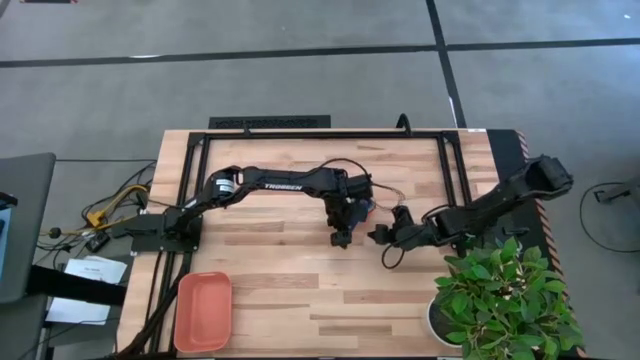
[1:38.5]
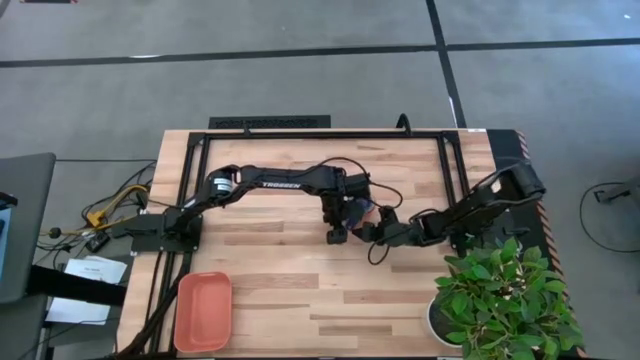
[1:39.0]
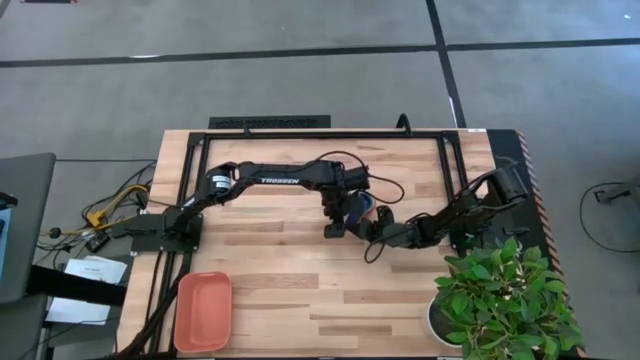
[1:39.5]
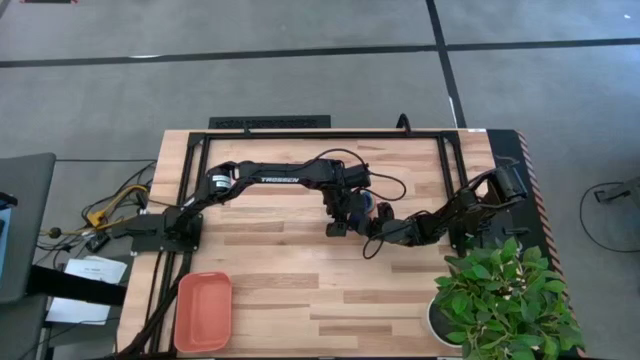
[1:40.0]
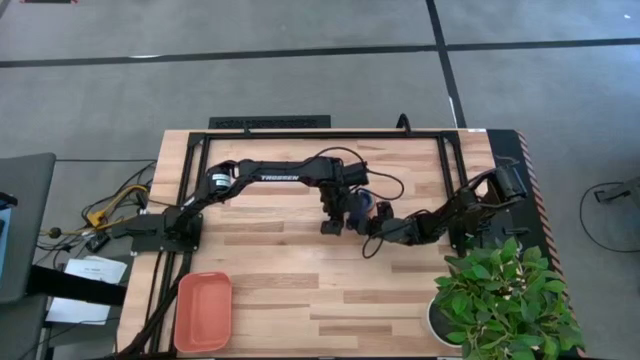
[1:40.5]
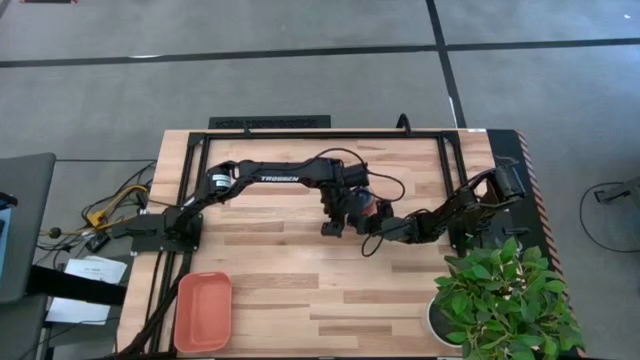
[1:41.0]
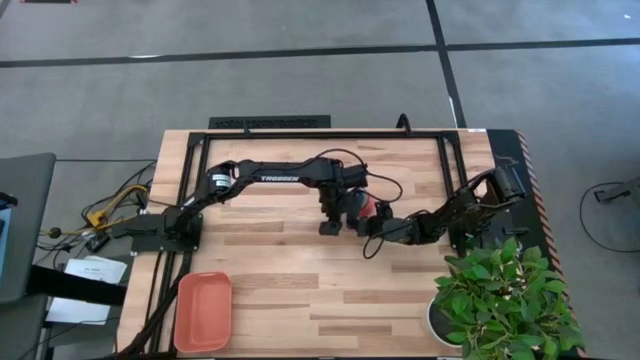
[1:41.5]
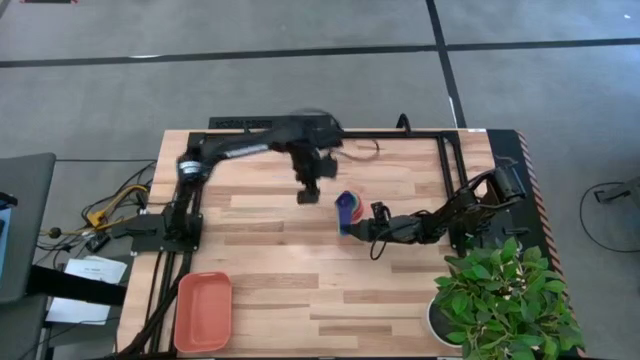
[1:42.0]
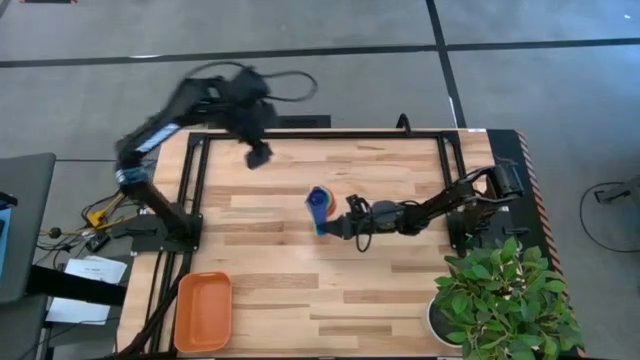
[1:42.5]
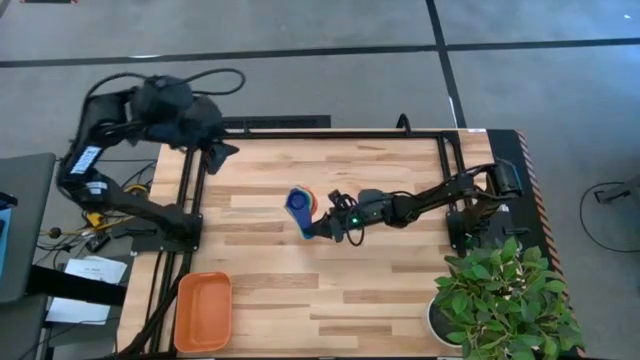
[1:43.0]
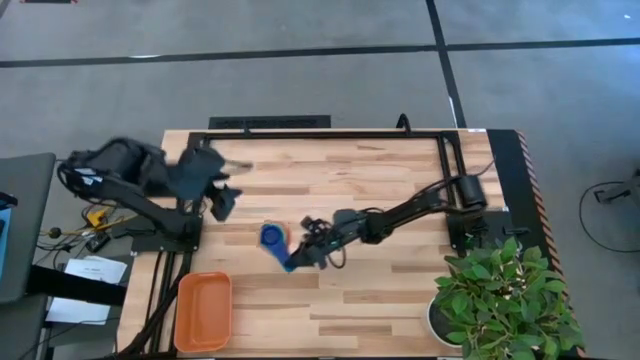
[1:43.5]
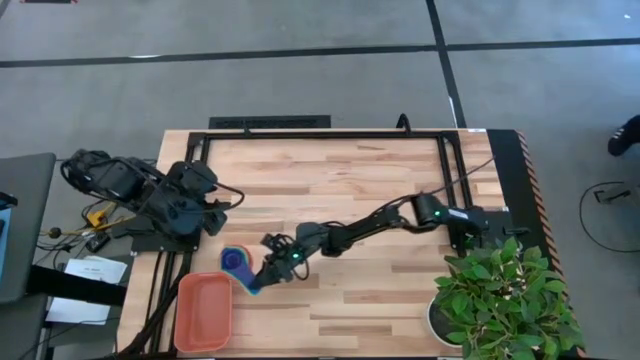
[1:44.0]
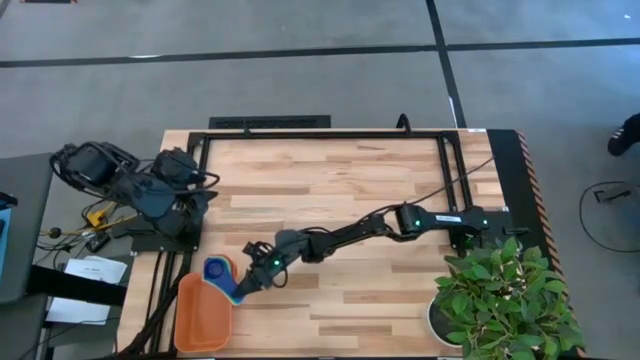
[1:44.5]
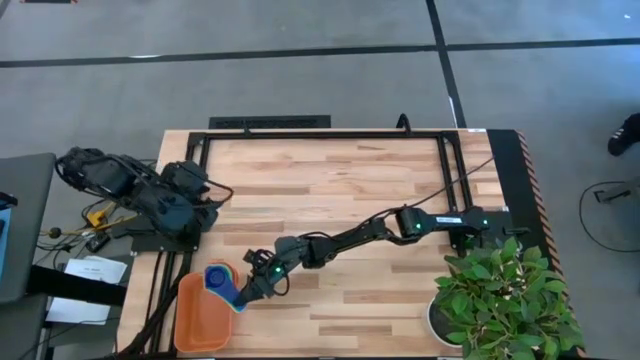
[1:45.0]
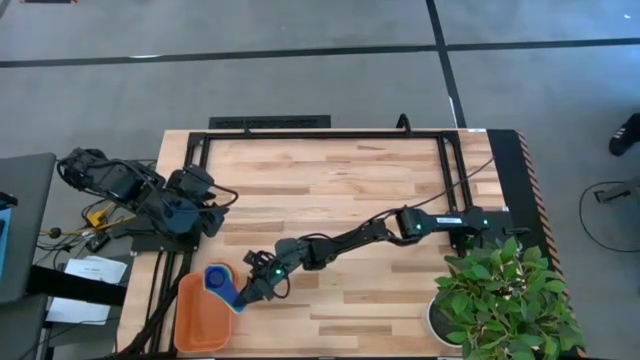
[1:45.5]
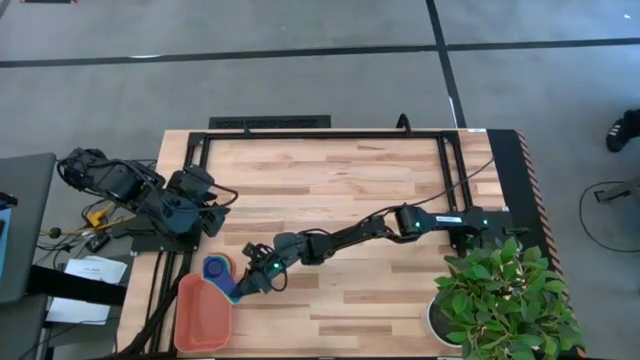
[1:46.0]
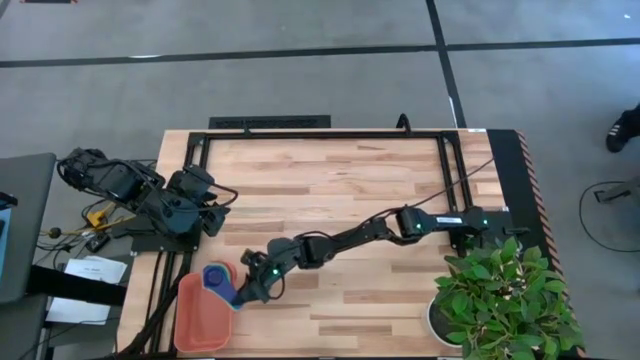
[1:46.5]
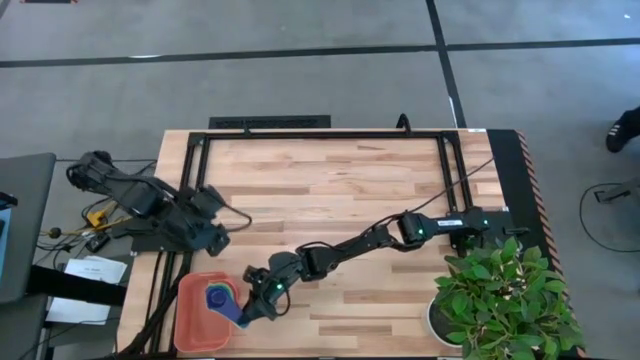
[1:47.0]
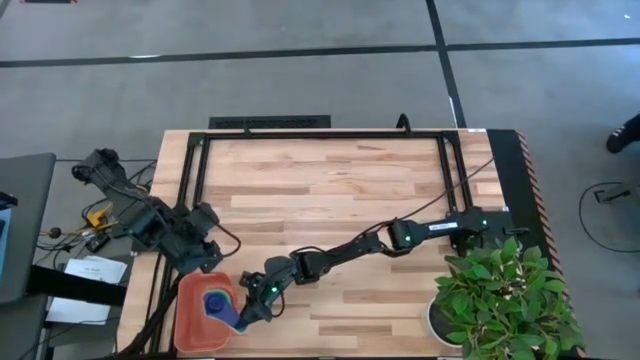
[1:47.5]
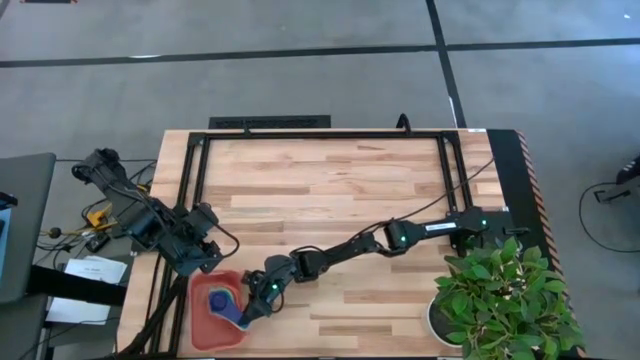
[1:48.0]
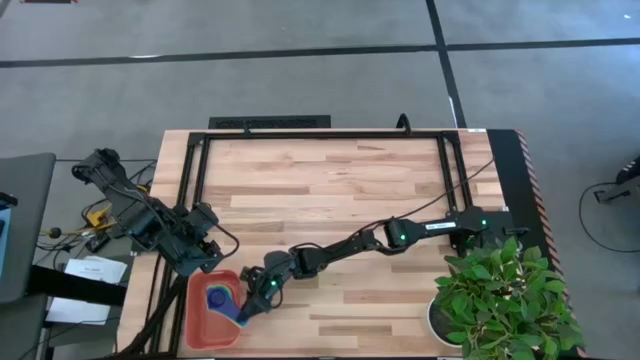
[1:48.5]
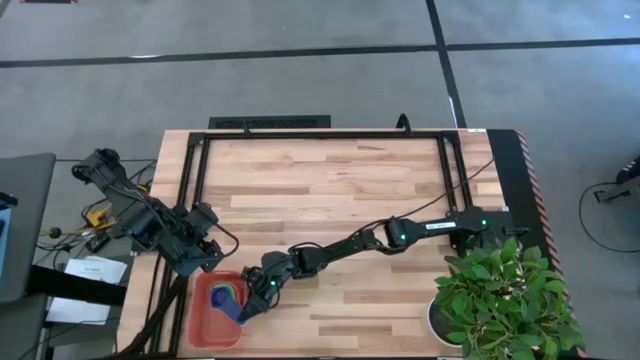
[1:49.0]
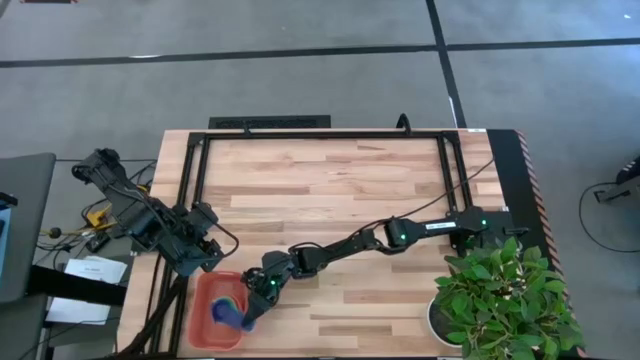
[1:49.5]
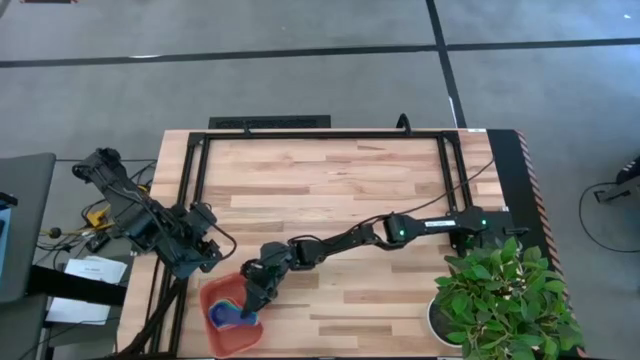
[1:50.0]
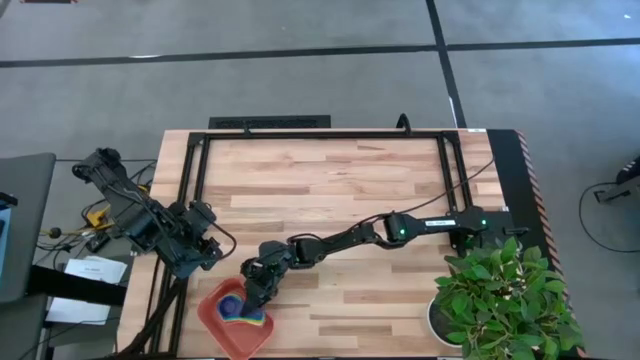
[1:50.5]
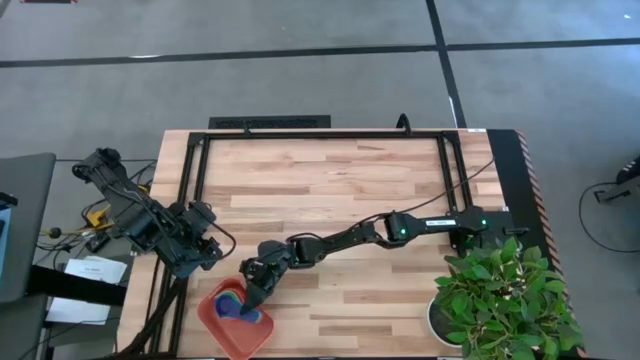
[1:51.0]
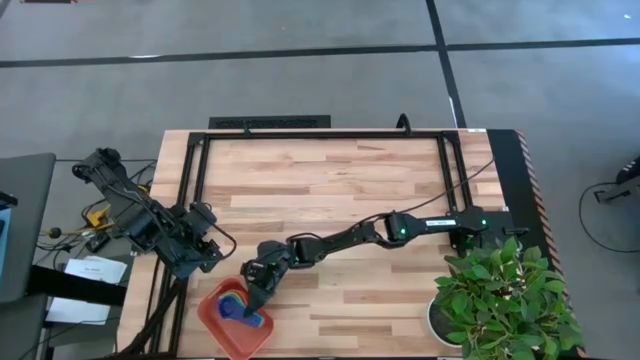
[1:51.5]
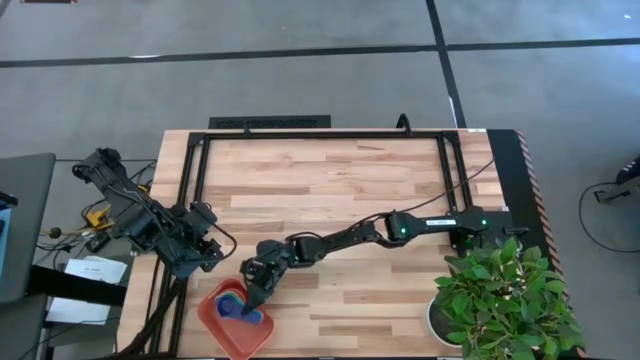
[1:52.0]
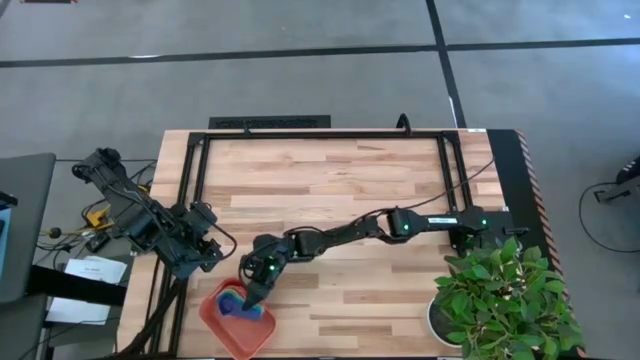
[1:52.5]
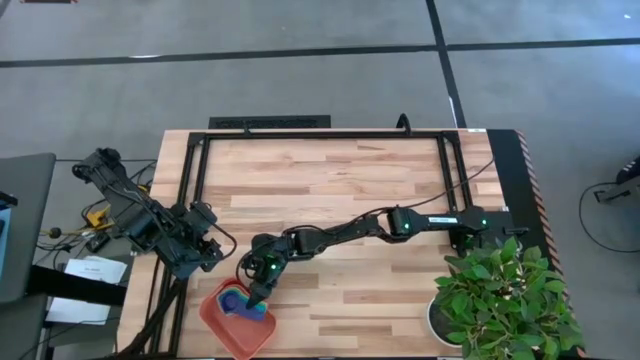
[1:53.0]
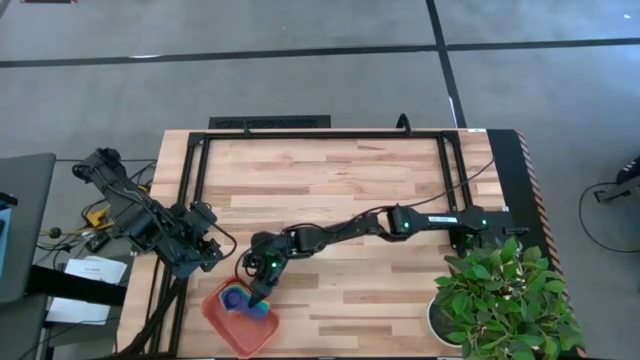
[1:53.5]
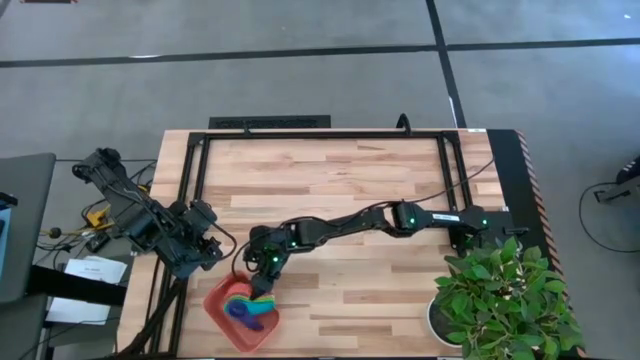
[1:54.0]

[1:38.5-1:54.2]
Task: Nest measuring cups in basket
Put the stacked colored measuring cups into the orange bin
